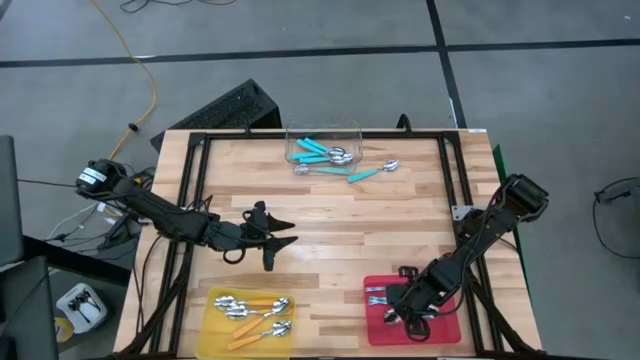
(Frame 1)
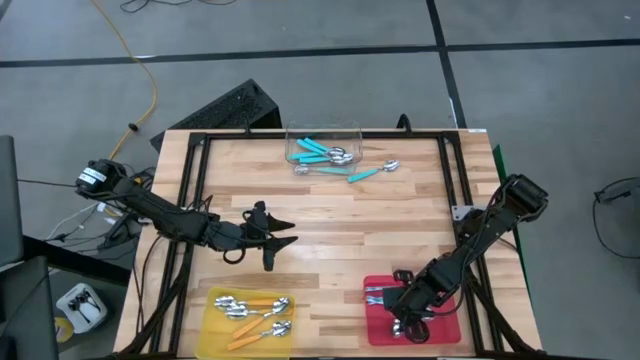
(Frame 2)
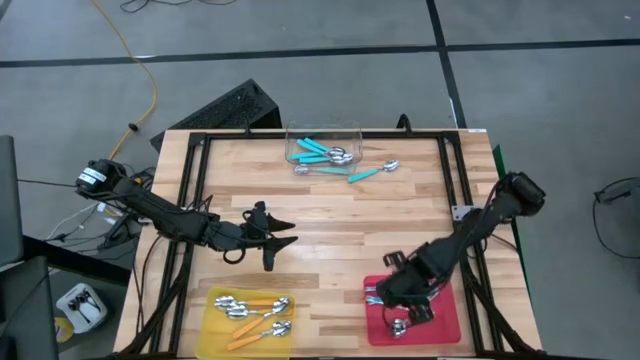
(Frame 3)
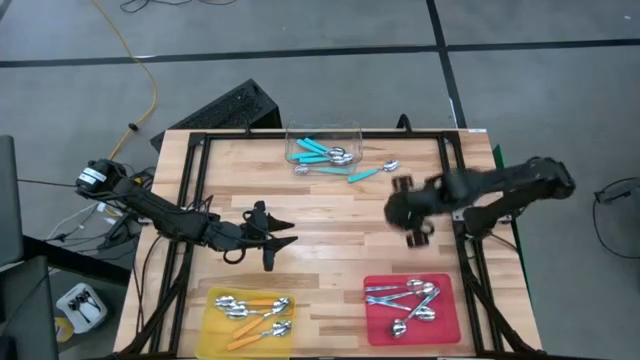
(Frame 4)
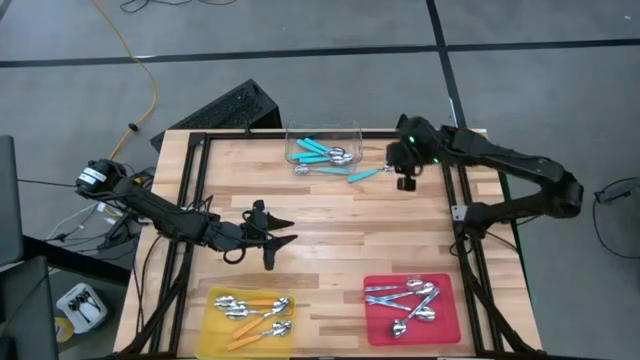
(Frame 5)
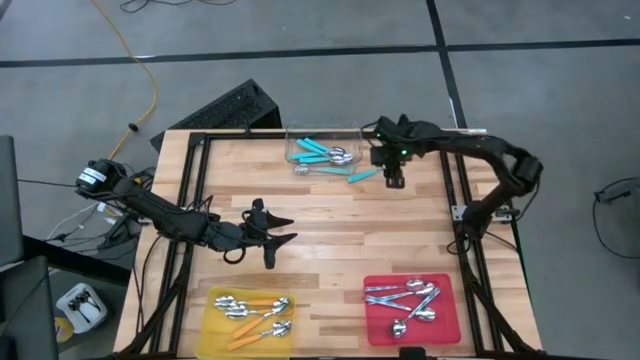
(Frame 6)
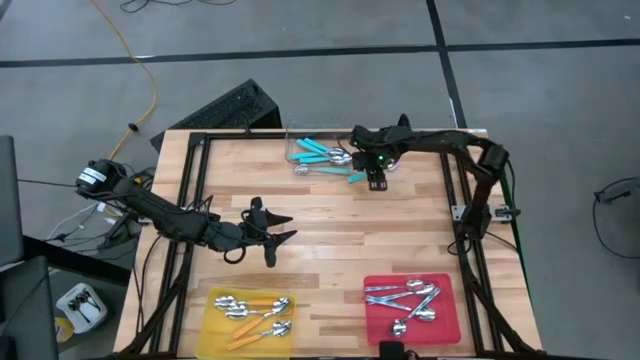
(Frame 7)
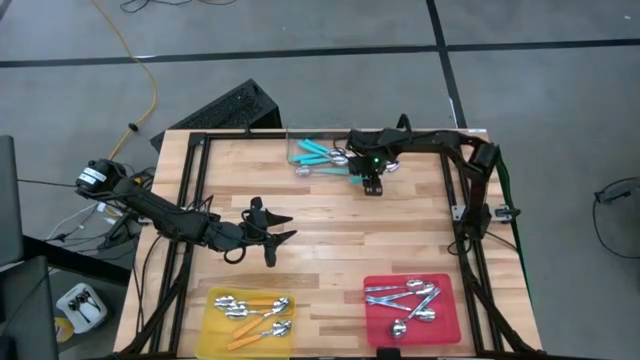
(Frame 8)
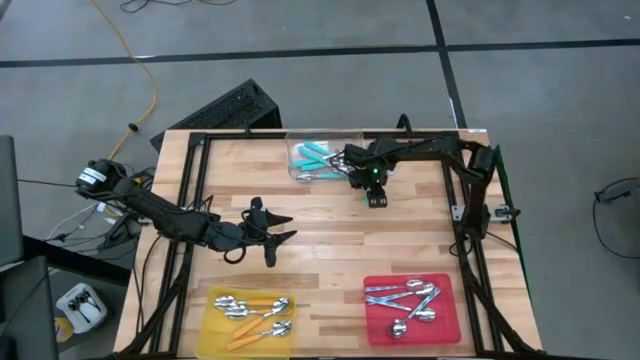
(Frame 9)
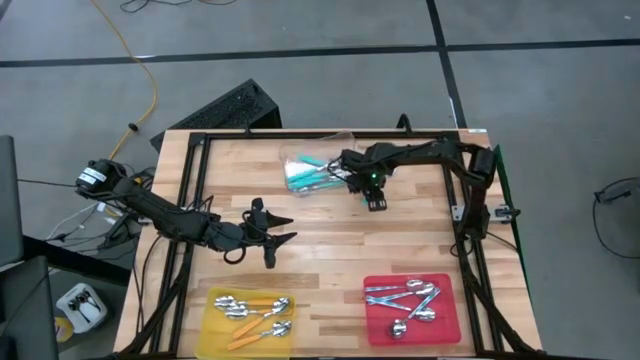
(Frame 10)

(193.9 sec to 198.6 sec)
Task: Sort silverware by color (type)
Put the blue spoon into the transparent bin

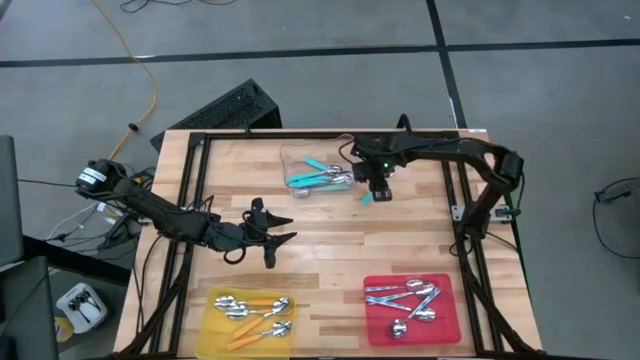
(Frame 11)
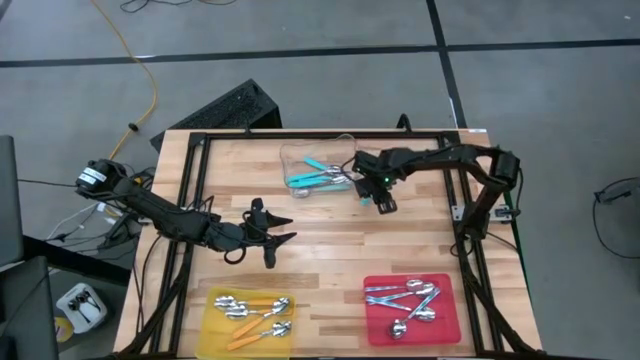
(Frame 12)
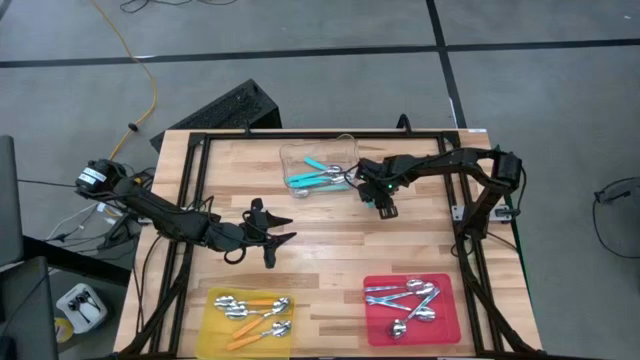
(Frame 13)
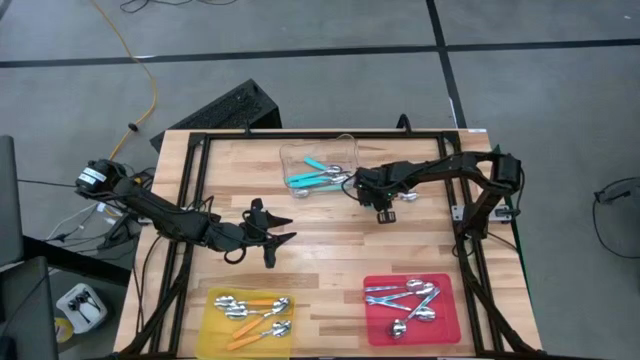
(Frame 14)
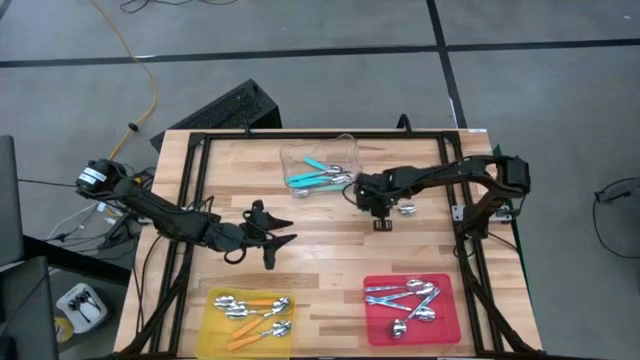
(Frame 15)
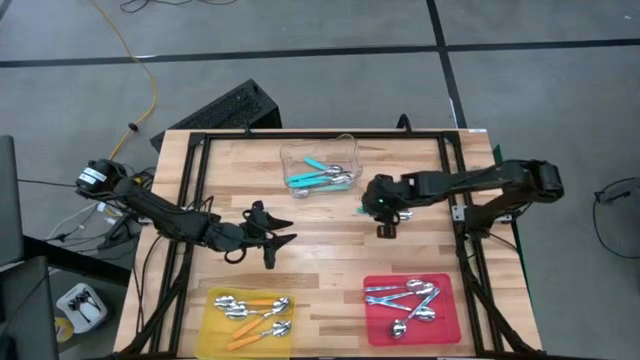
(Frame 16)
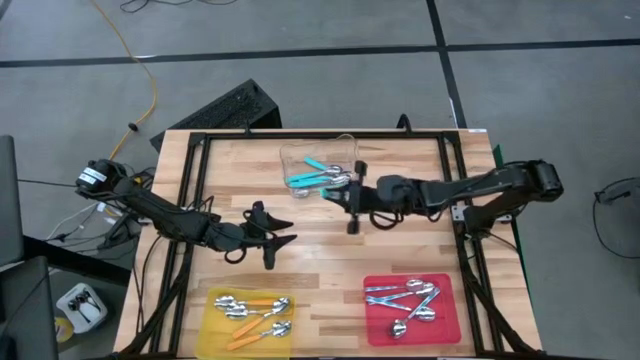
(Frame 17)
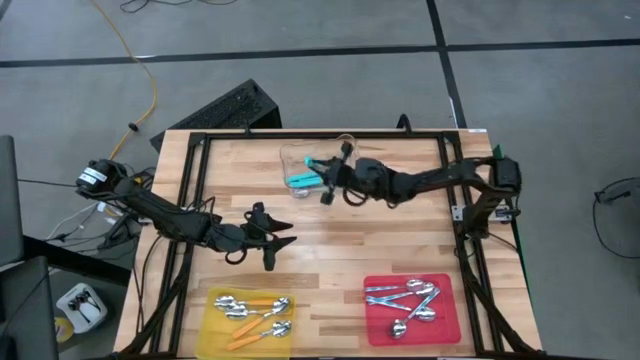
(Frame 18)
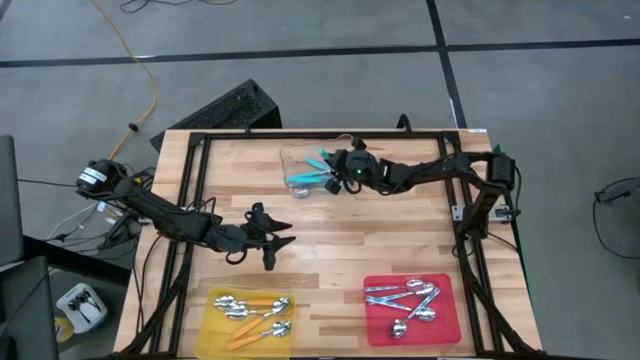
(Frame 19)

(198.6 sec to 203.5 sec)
Put the blue spoon into the transparent bin

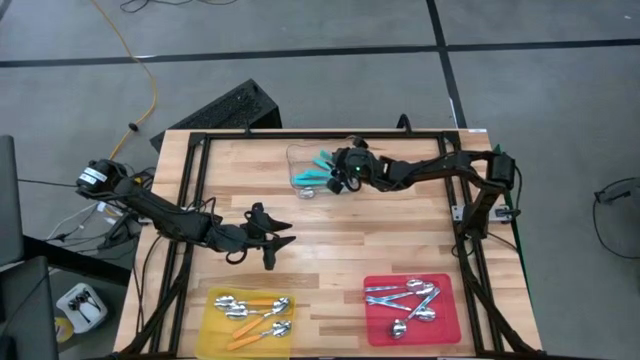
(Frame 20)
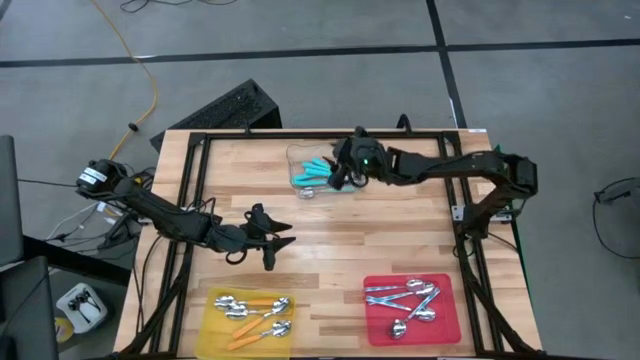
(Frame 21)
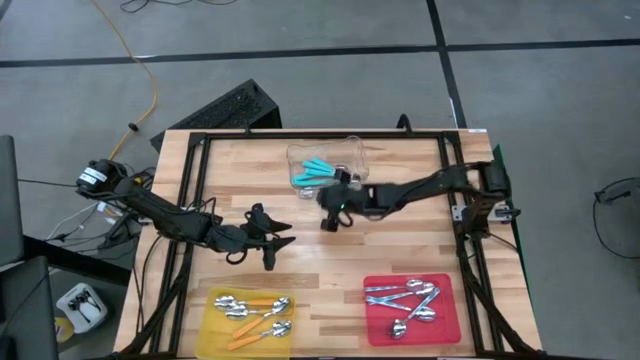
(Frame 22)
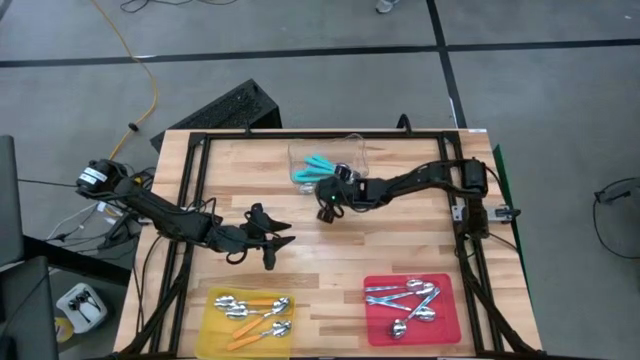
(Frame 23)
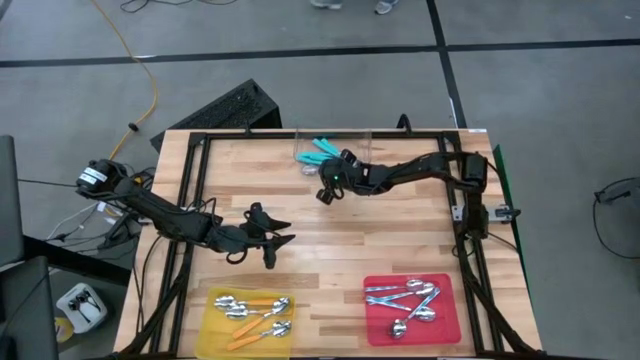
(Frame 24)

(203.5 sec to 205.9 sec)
Adjust the transparent bin

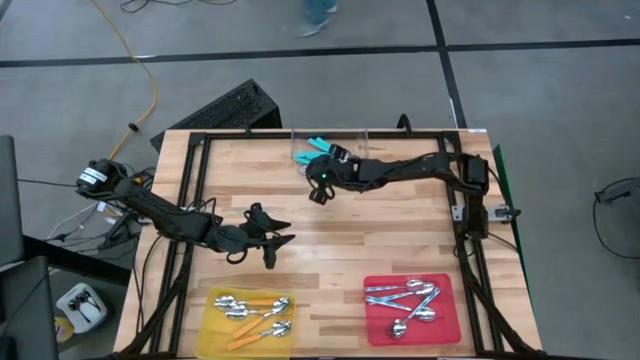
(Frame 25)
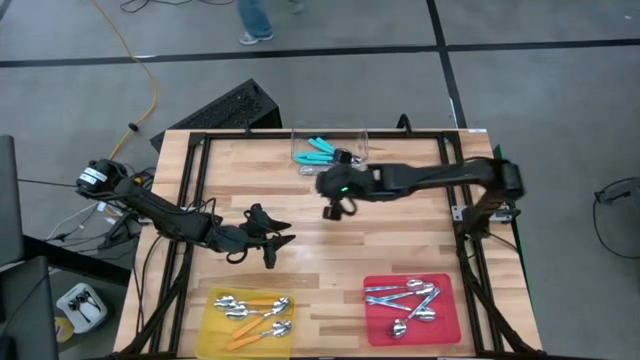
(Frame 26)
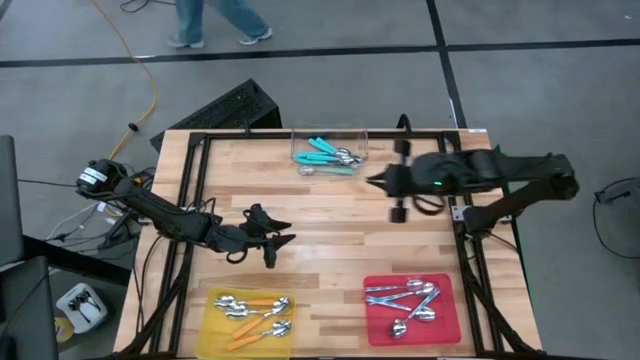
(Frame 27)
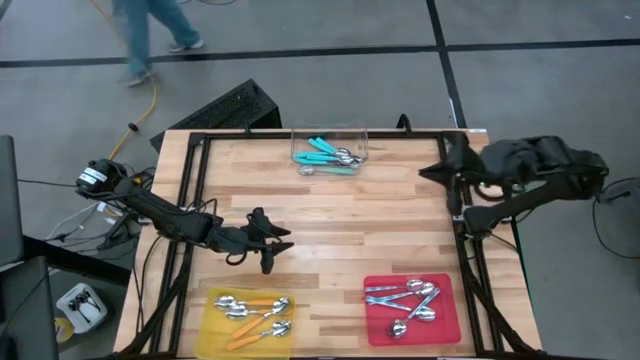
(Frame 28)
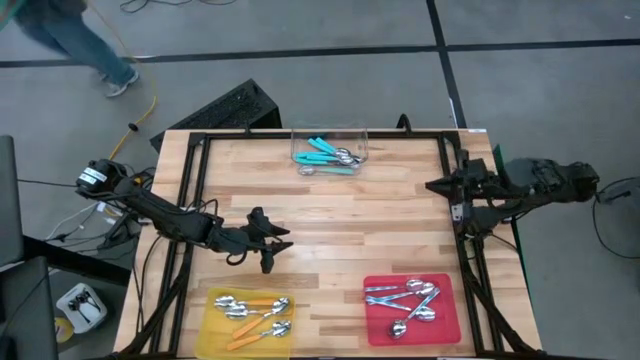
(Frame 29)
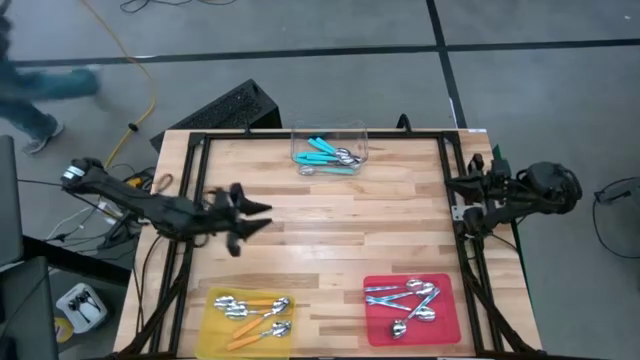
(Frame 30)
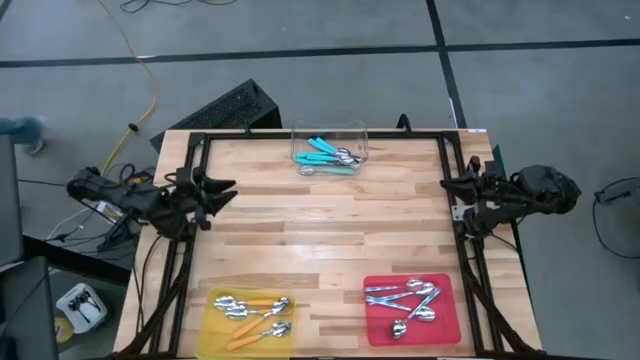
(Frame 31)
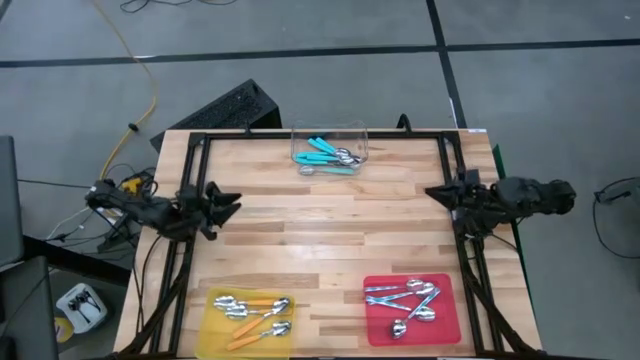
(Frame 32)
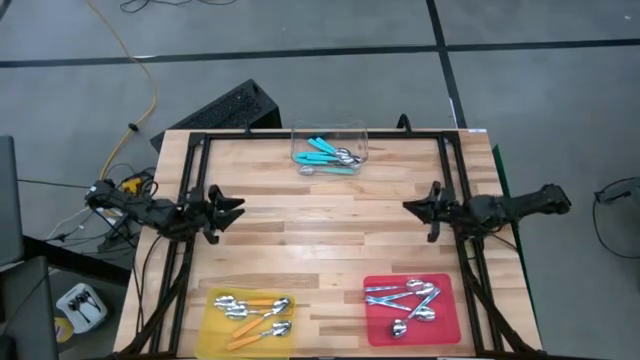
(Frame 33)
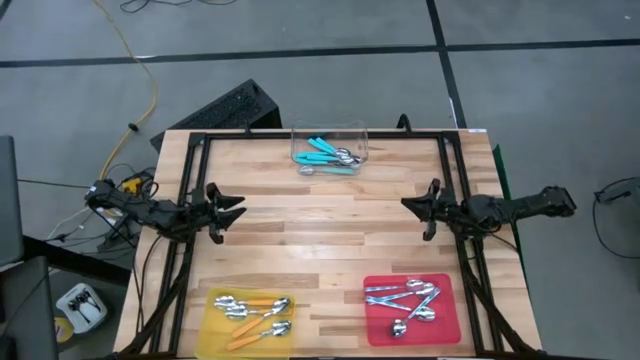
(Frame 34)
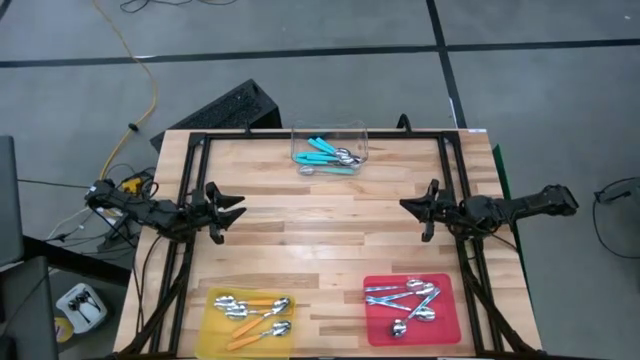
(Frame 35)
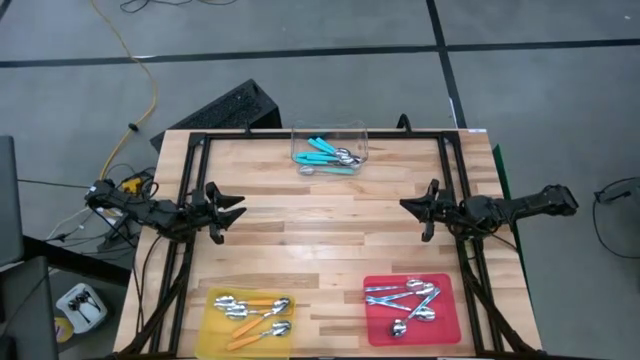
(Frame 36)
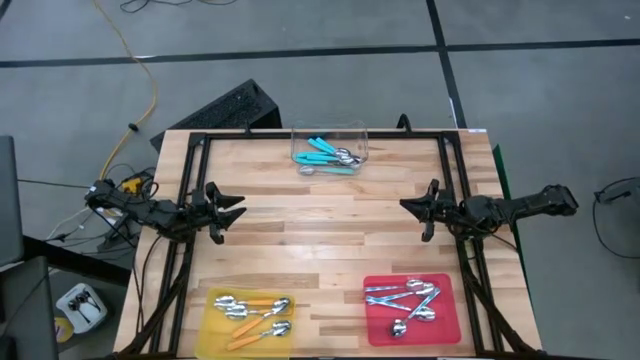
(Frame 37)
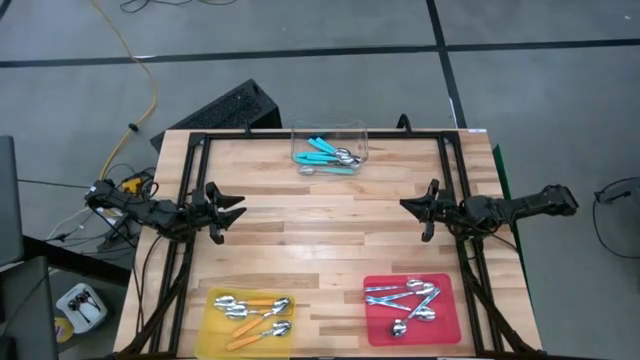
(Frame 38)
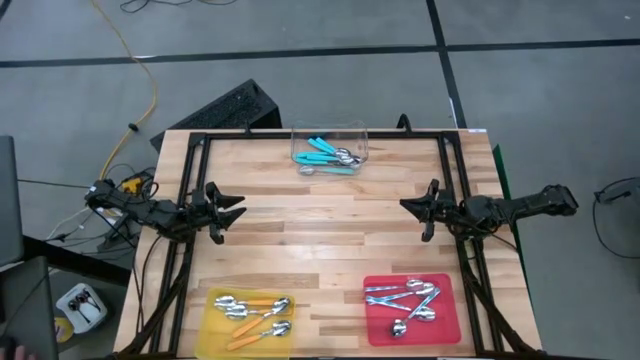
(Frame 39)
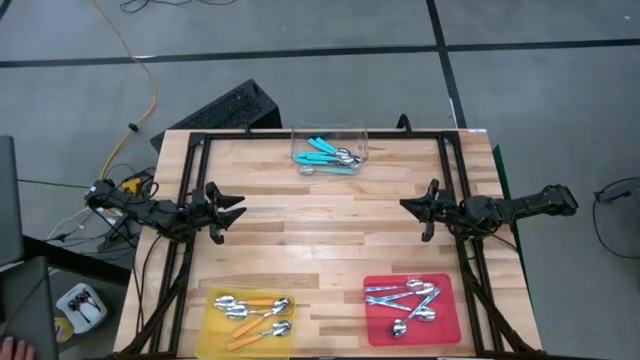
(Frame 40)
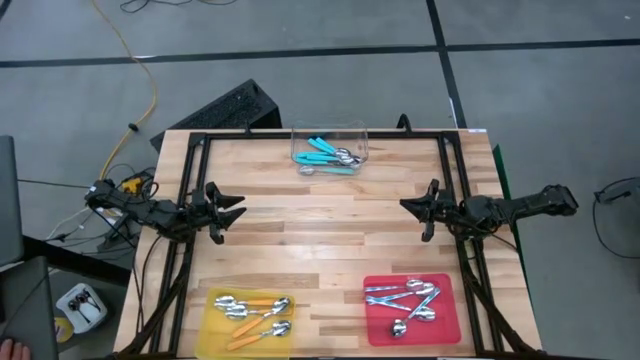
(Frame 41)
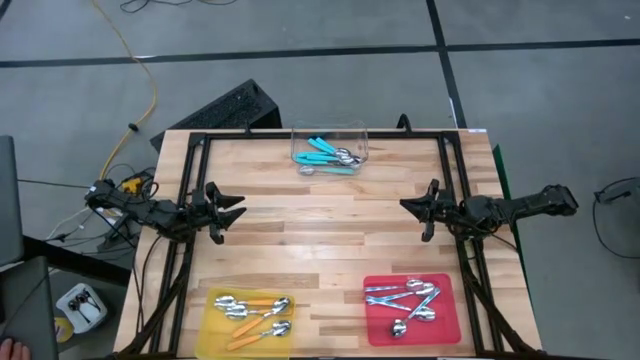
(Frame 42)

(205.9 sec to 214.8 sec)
Return to Home Position
